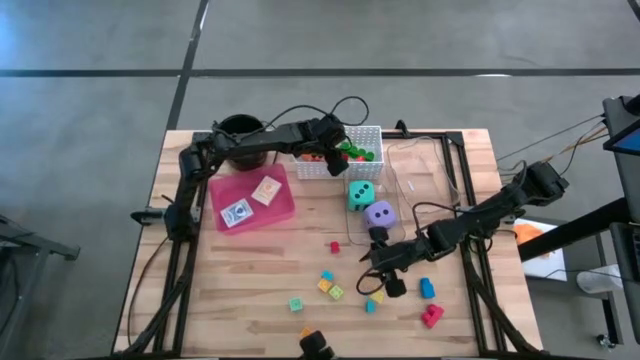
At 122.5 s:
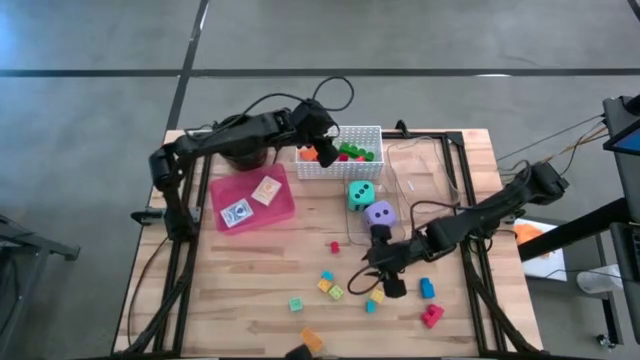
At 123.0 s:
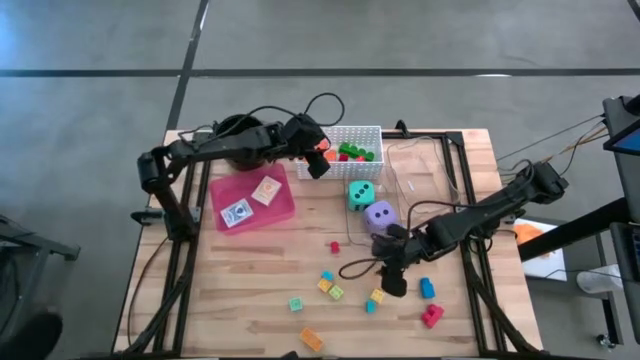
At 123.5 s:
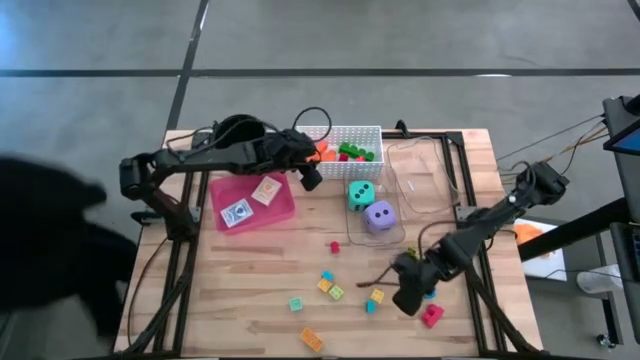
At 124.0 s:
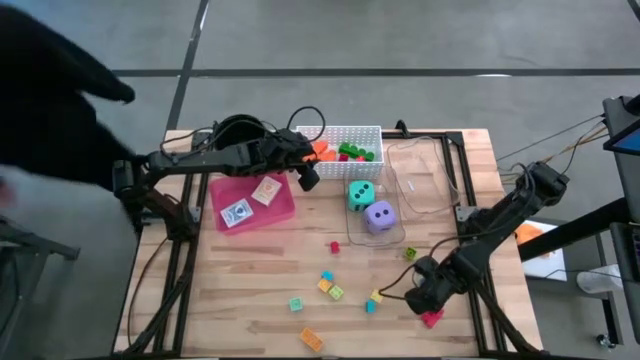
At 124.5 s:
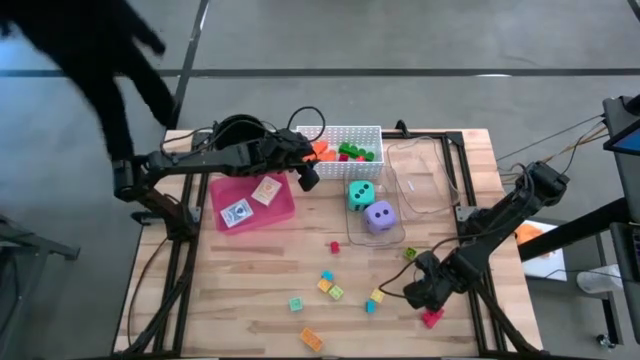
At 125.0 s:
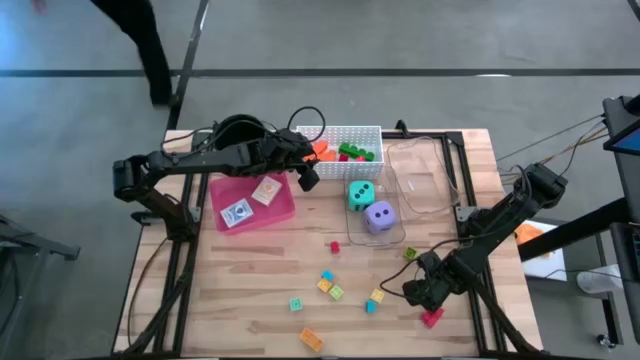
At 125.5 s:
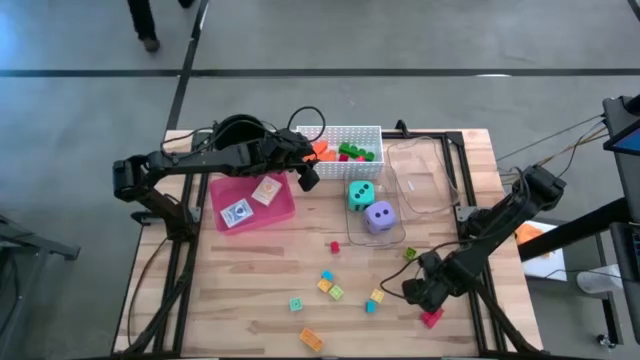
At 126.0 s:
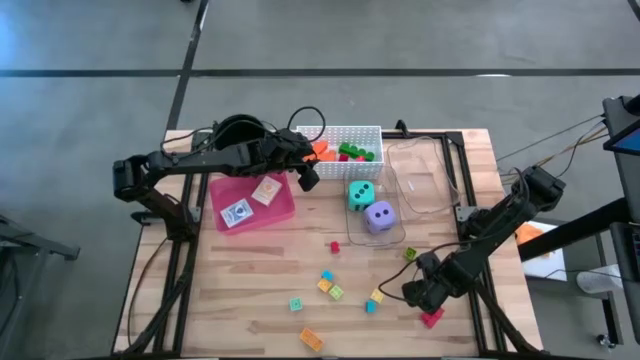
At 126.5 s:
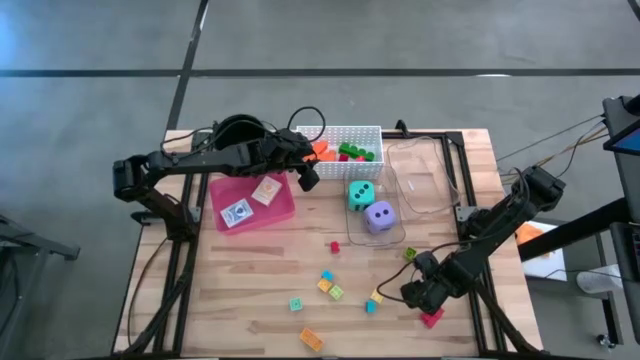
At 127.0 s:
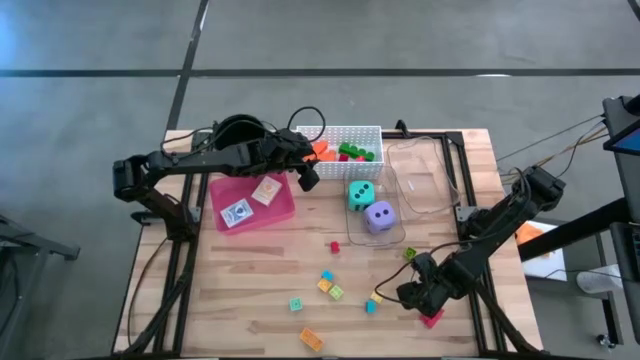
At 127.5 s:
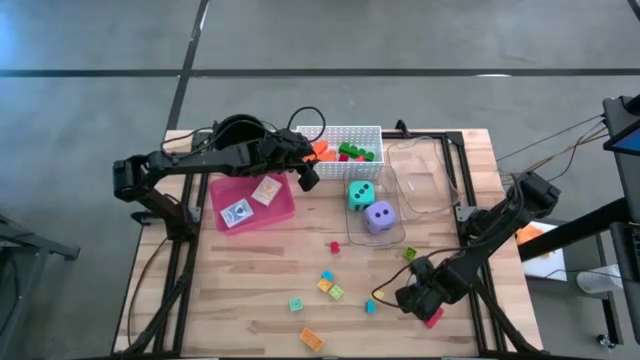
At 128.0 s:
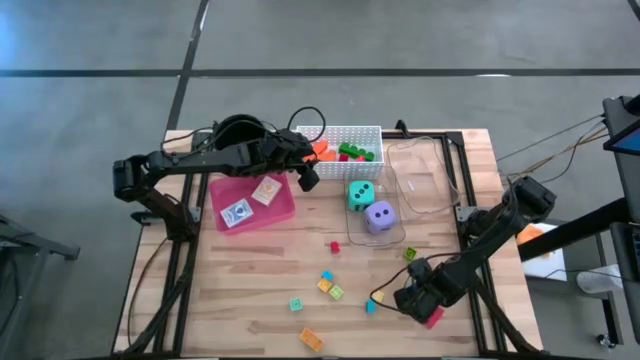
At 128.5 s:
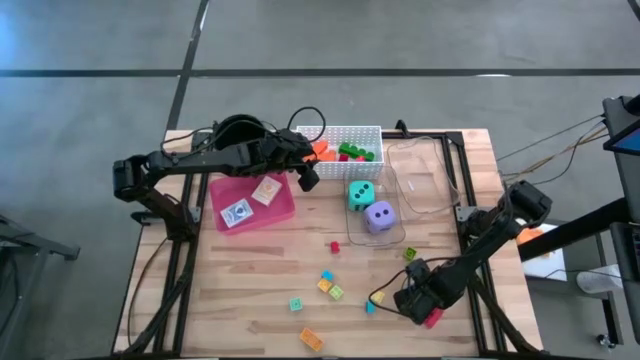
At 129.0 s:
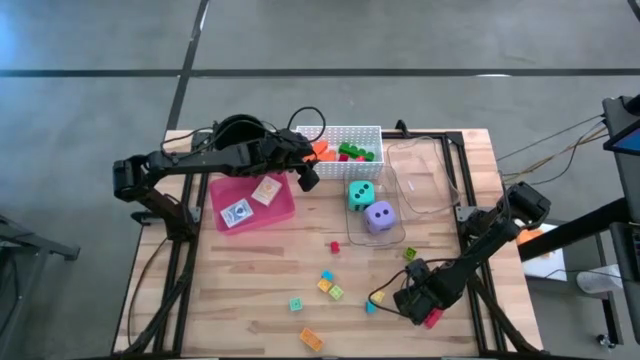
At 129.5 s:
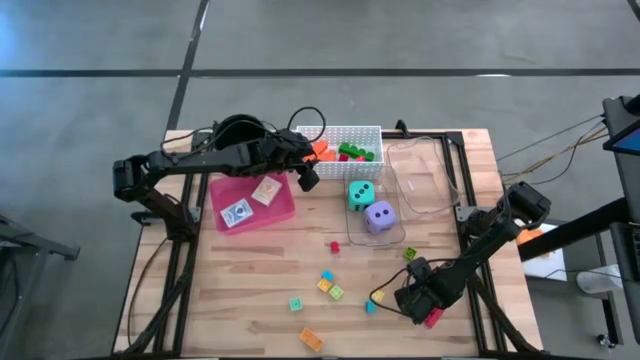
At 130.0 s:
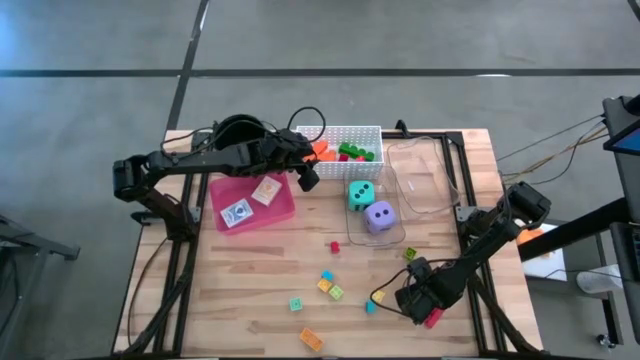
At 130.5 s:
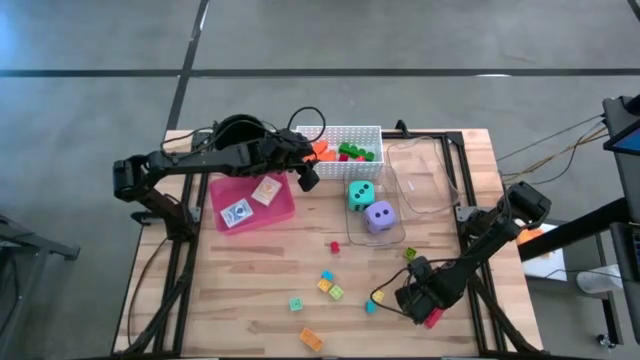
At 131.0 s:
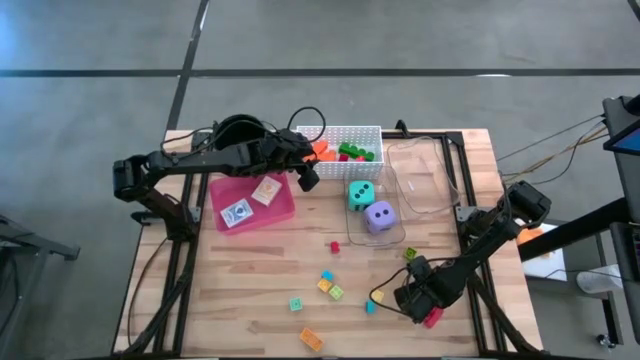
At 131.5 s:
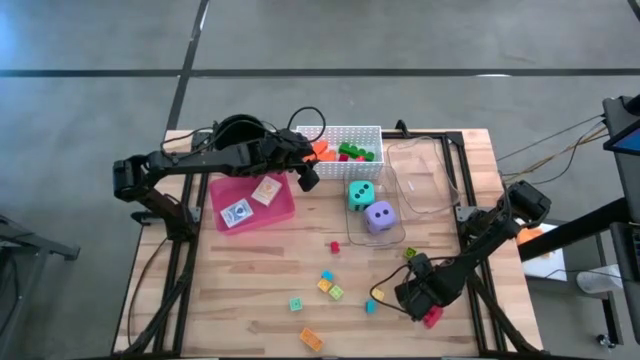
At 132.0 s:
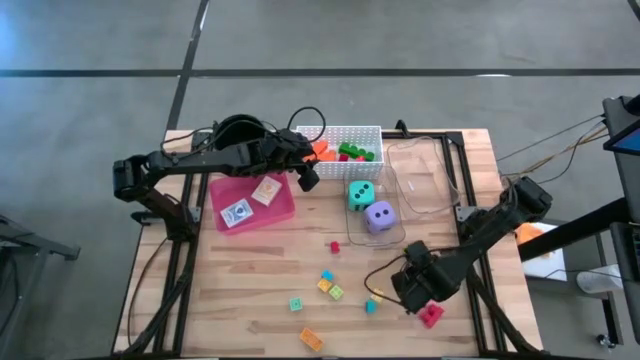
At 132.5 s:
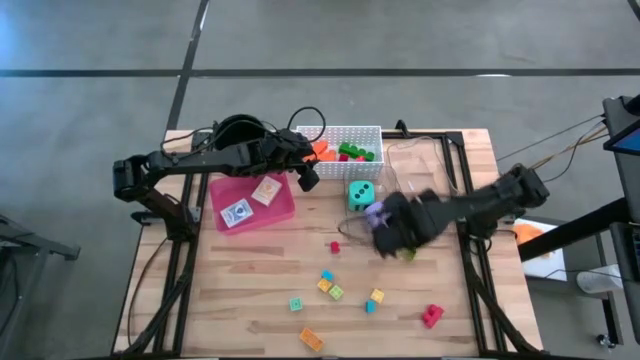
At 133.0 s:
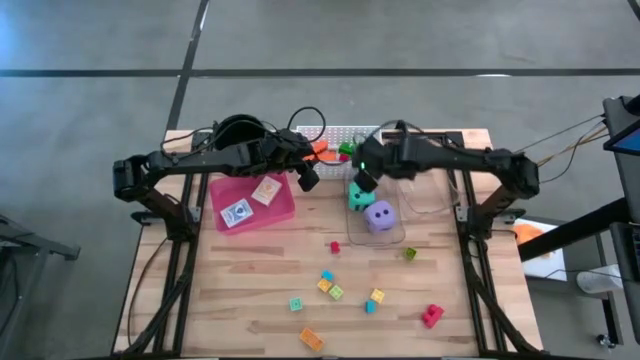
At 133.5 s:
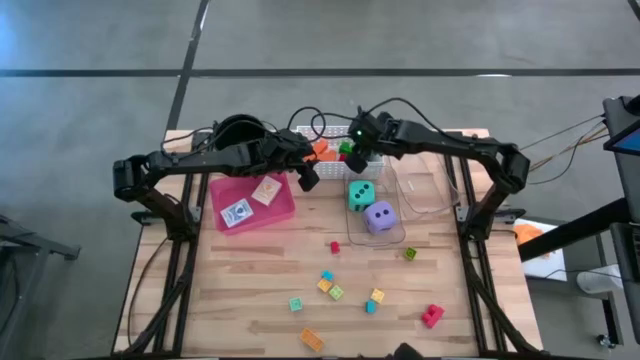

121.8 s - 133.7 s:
Task: Pick & Place Toys
Put the big dark blue game piece into the white bin

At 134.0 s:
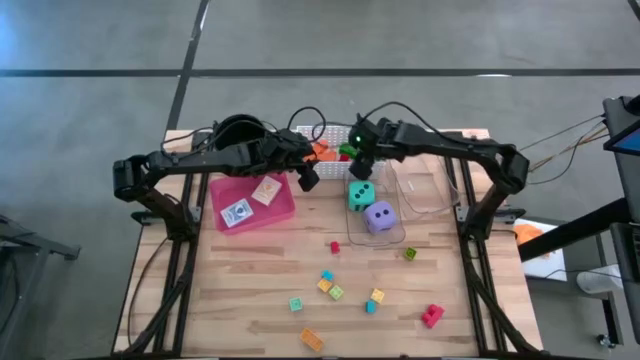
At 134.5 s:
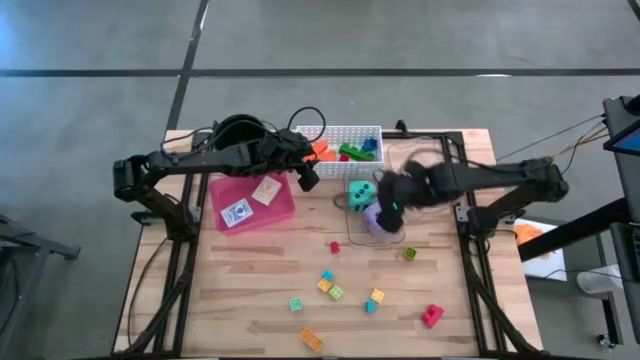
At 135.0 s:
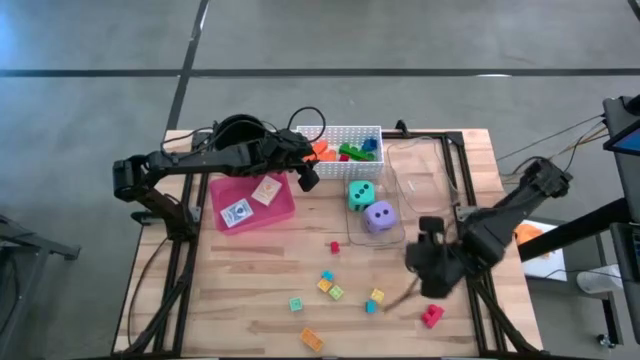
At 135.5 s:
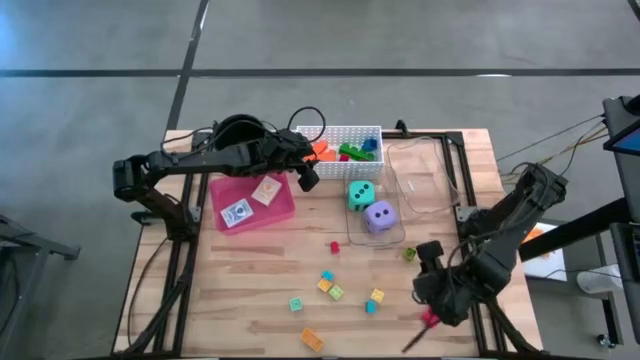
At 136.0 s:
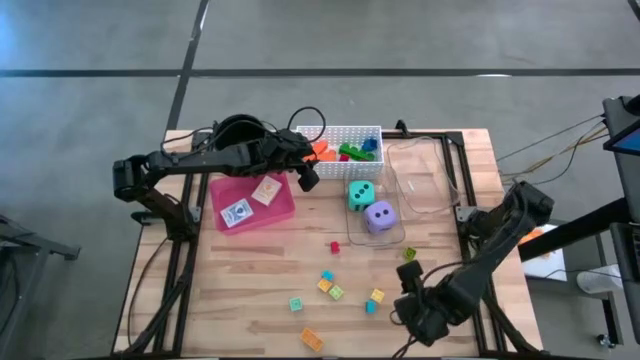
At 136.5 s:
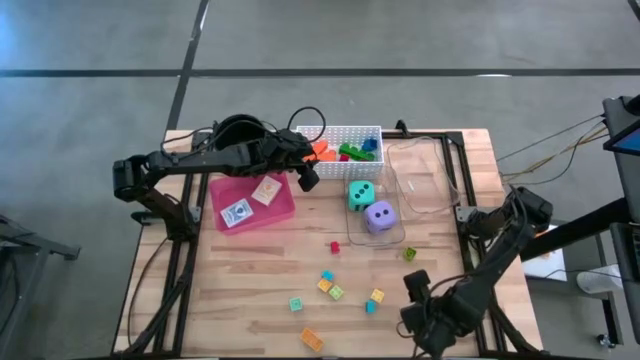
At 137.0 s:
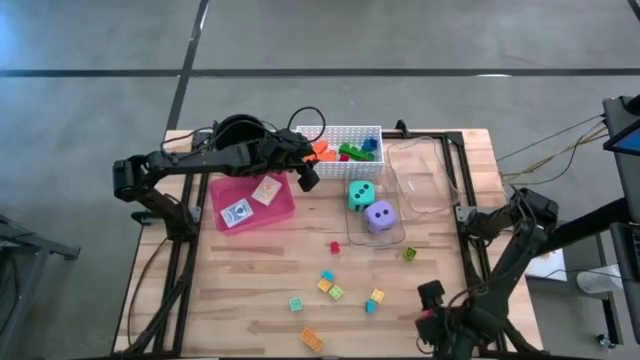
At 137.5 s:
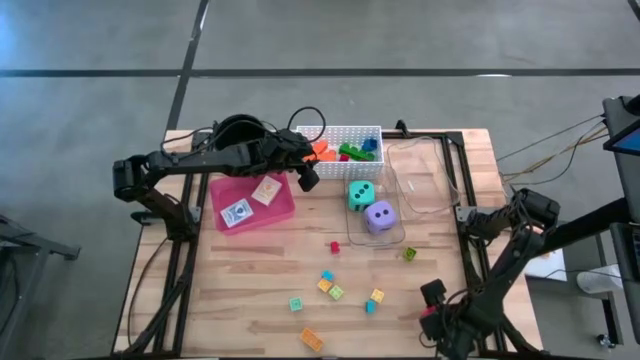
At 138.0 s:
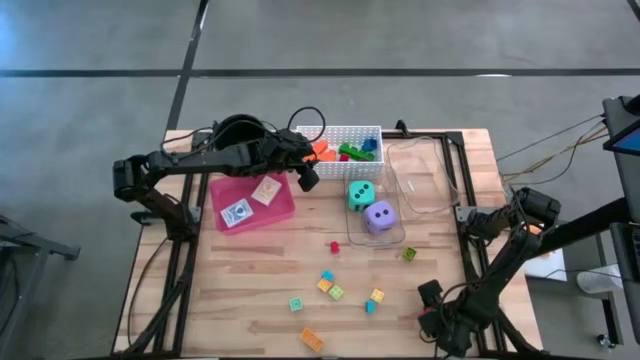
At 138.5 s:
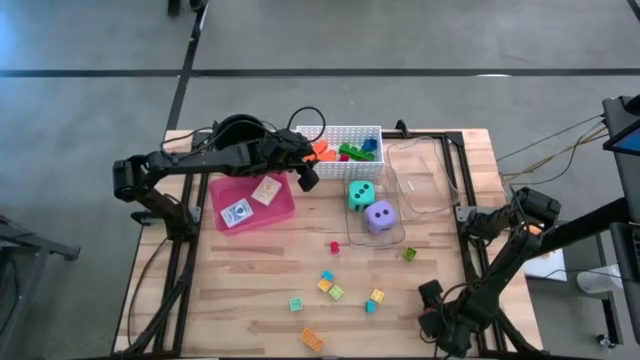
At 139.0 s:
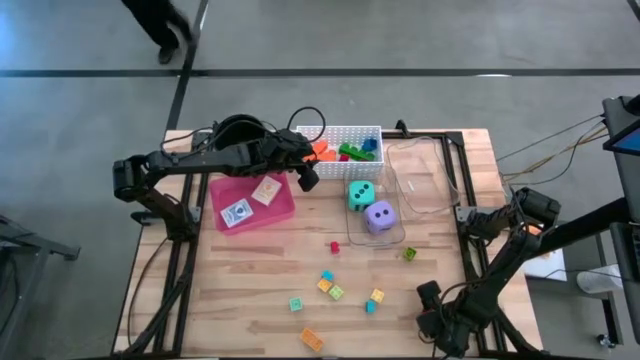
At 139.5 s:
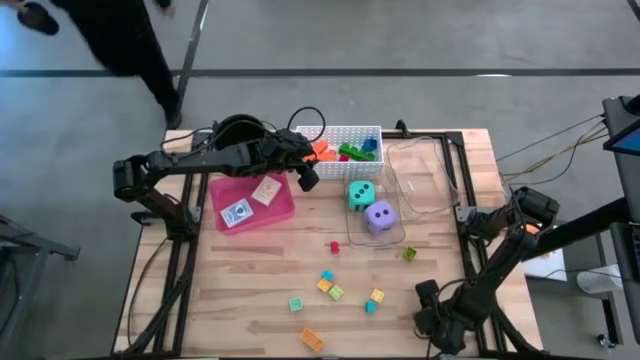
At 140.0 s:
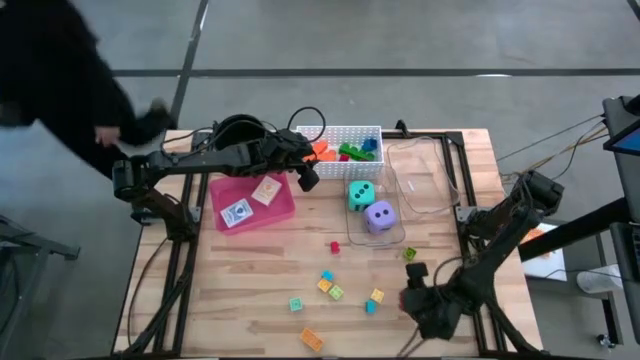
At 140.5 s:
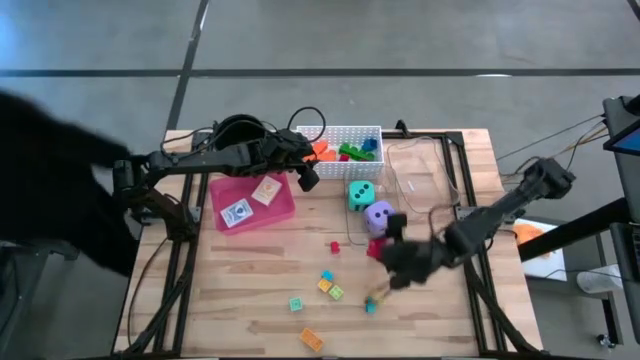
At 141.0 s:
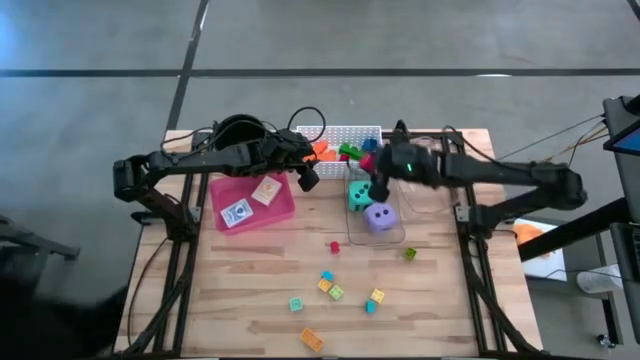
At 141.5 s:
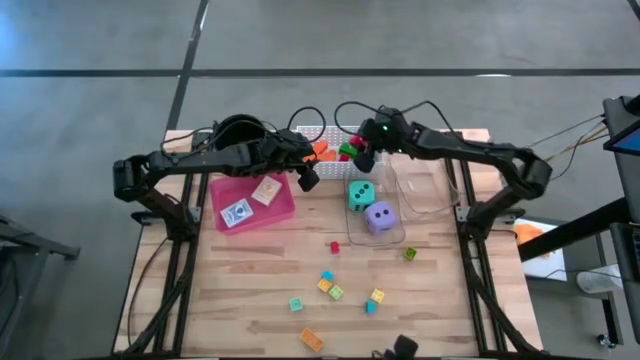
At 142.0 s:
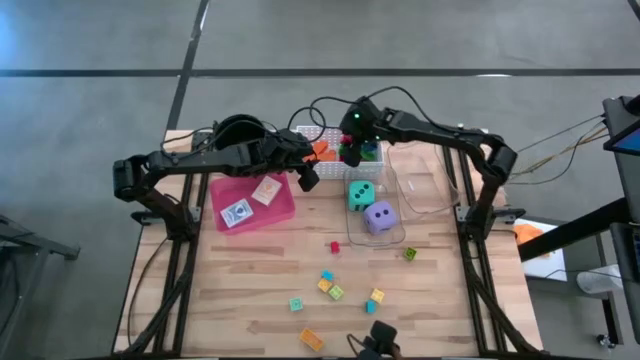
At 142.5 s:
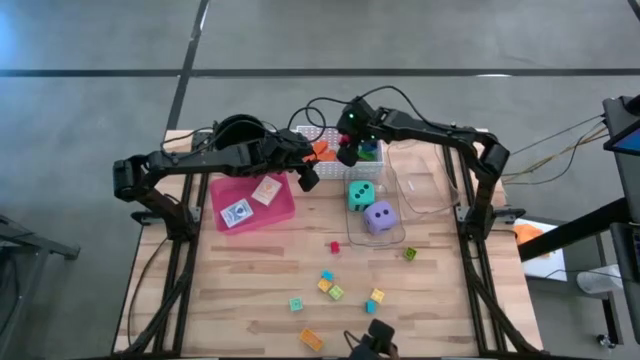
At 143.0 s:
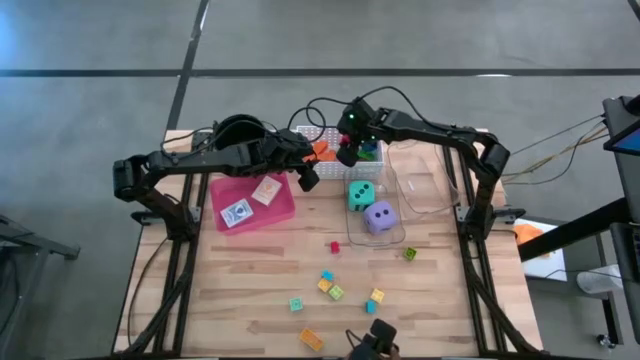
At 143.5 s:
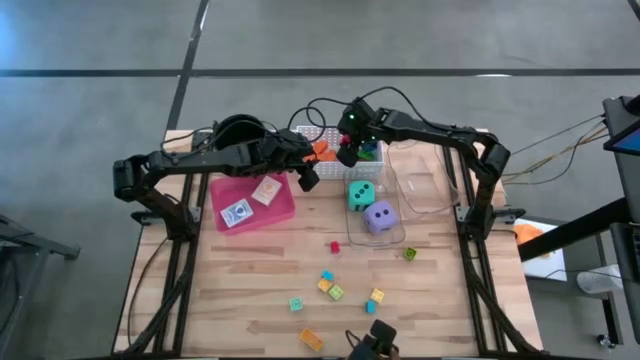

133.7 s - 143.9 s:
Put the big red game piece into the white bin
